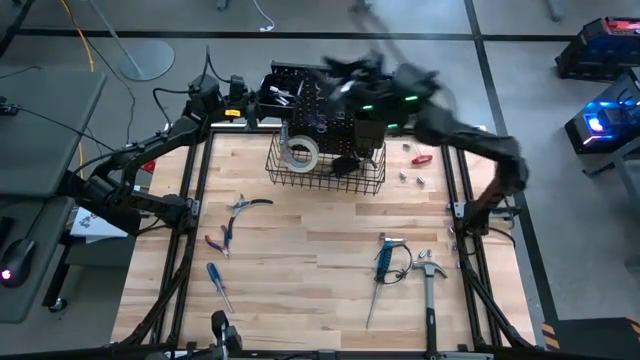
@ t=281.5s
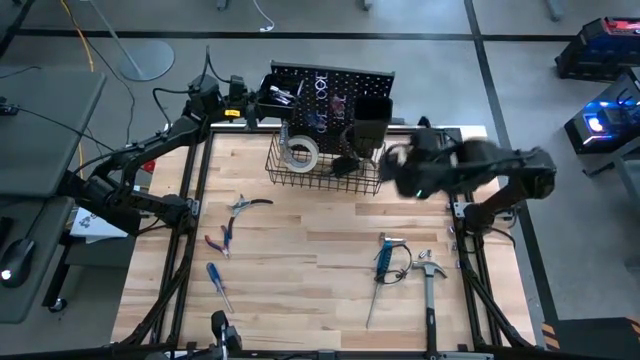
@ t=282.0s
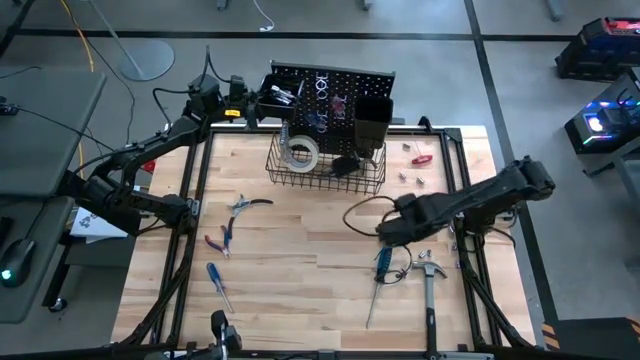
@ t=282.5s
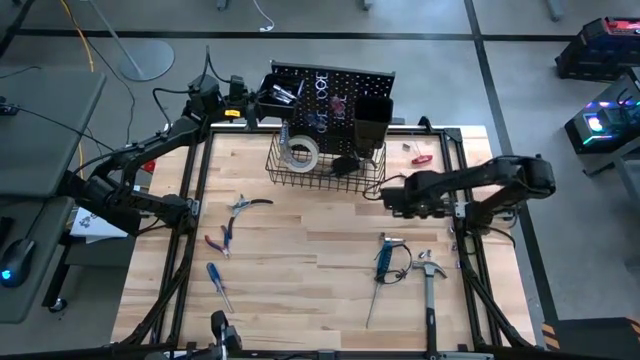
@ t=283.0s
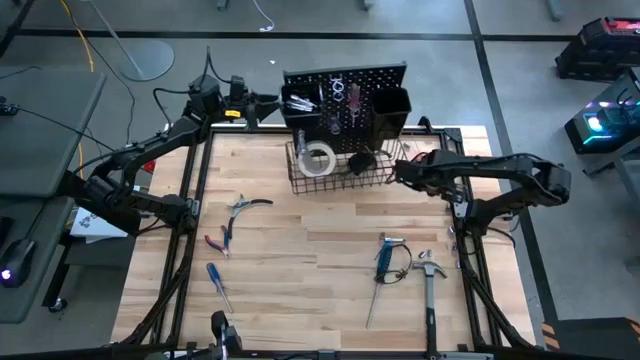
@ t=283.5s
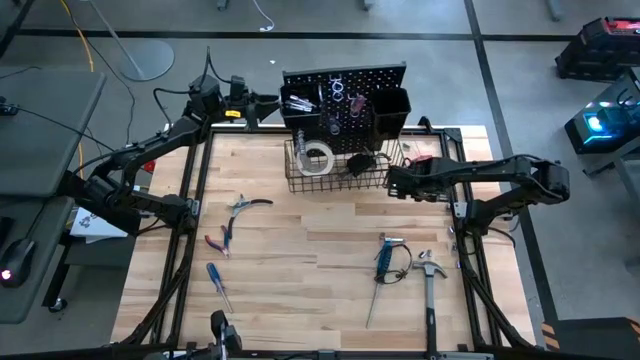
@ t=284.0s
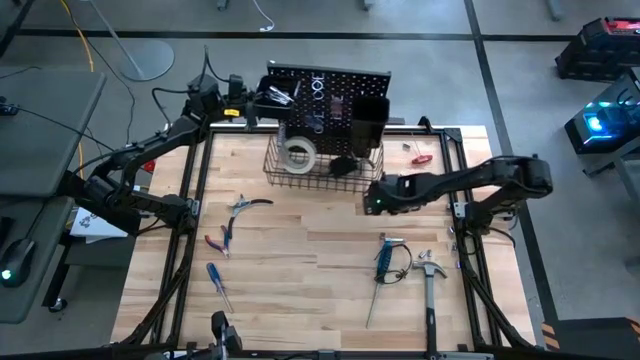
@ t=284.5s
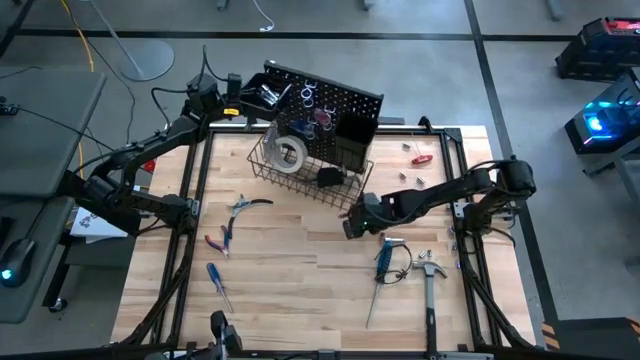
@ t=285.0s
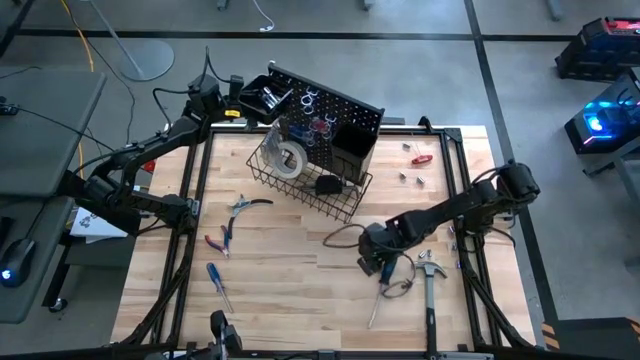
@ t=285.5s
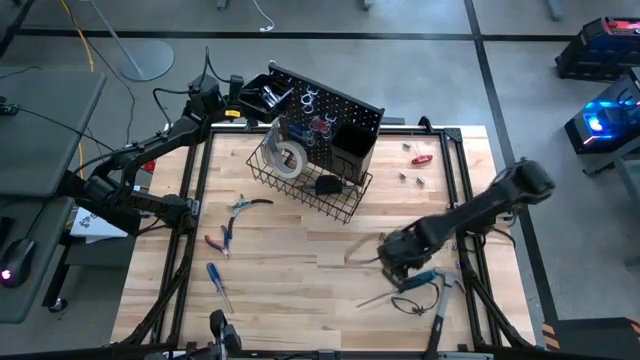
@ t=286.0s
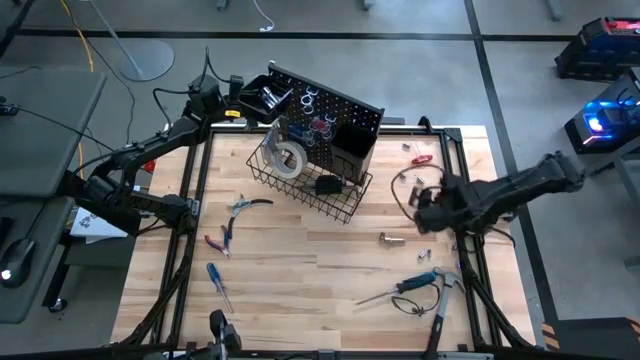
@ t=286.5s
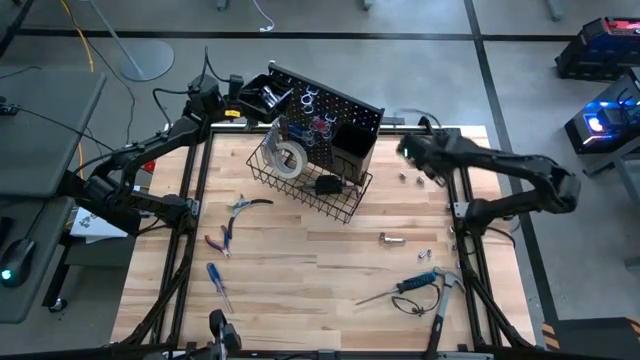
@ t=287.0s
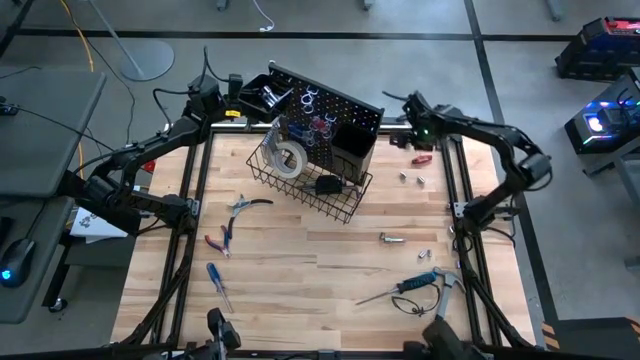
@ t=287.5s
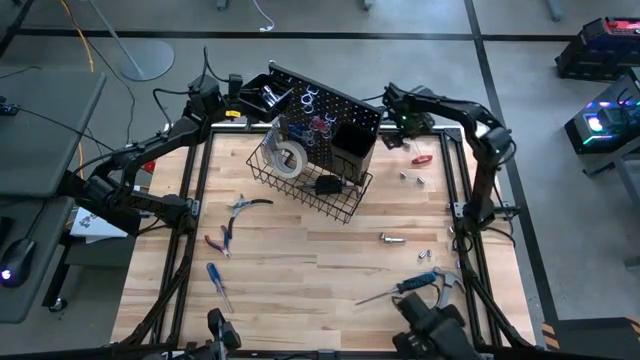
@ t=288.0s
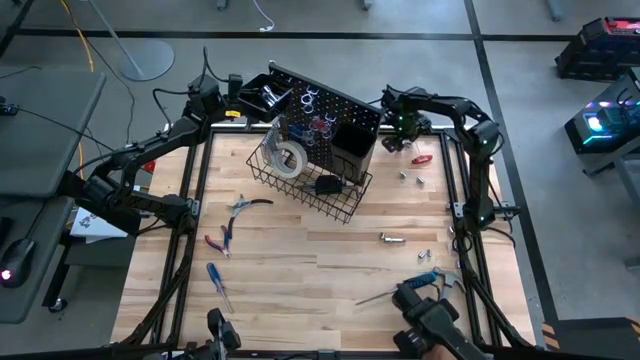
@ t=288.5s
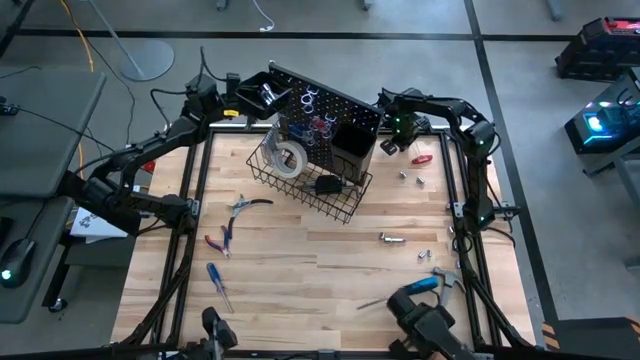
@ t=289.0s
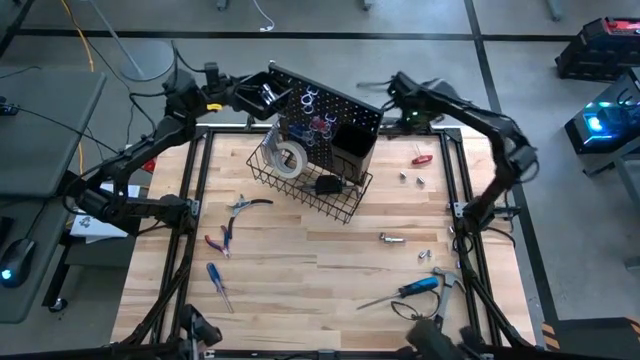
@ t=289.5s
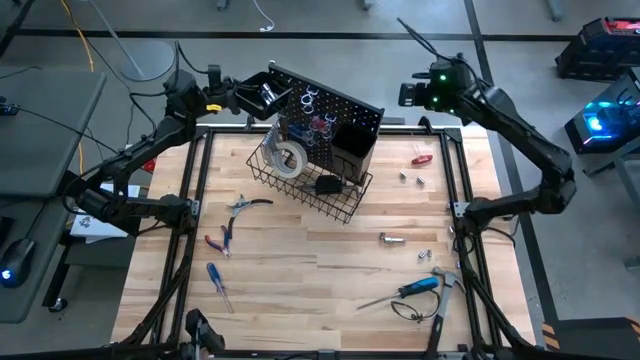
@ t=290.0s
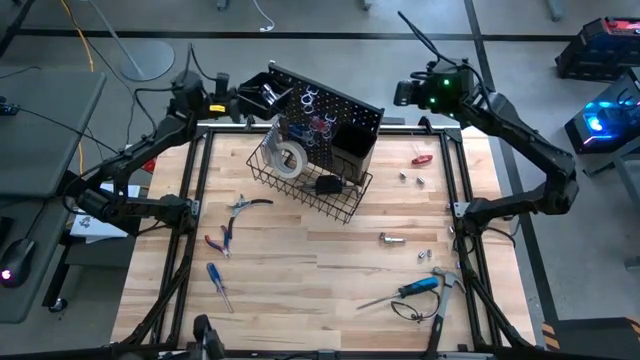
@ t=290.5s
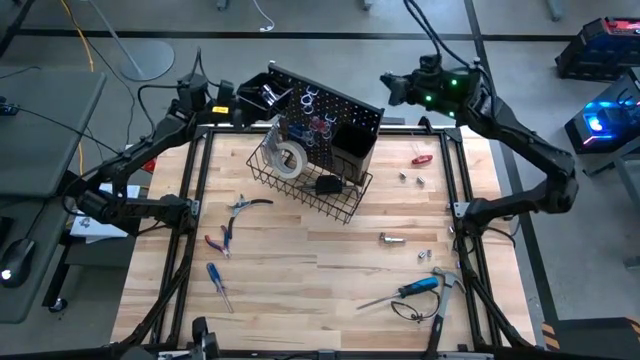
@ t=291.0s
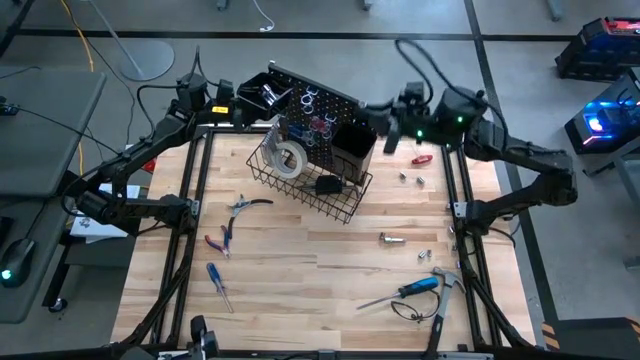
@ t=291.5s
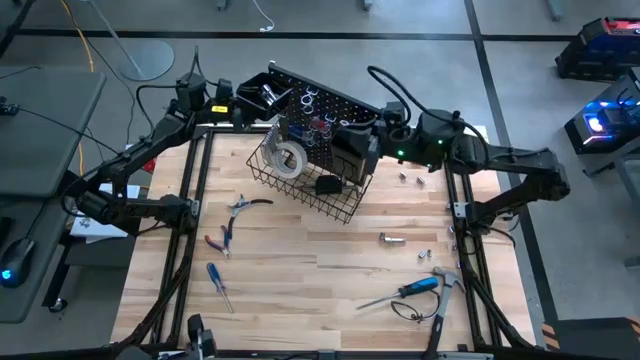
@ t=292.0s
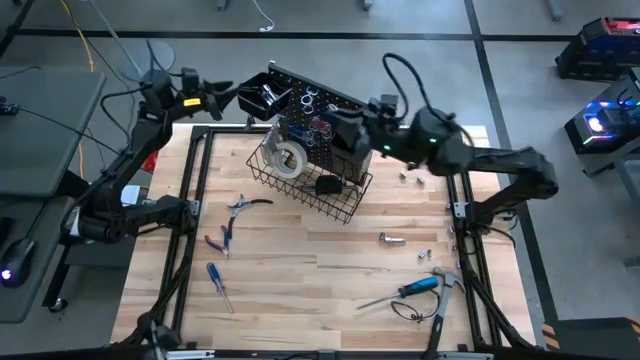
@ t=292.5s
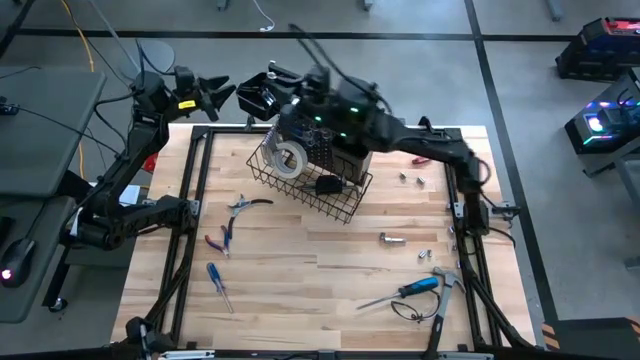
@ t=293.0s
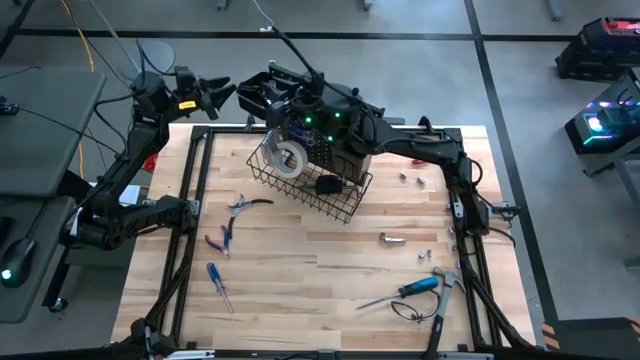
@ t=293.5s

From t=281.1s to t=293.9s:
Task: Hang tools onto peg board
Put the socket in the left black bin on the pegboard

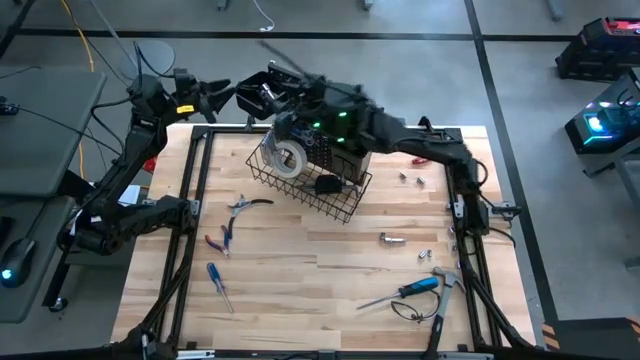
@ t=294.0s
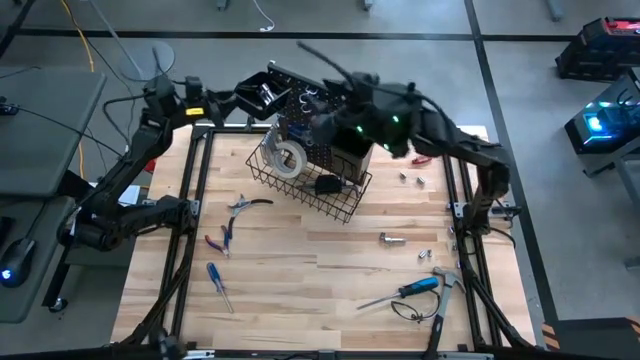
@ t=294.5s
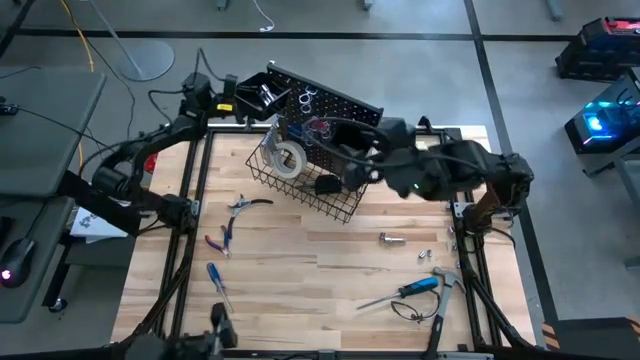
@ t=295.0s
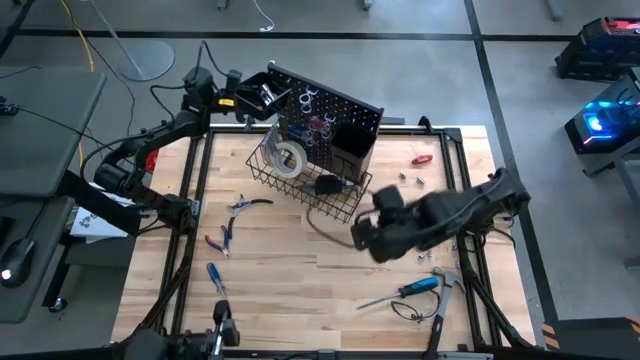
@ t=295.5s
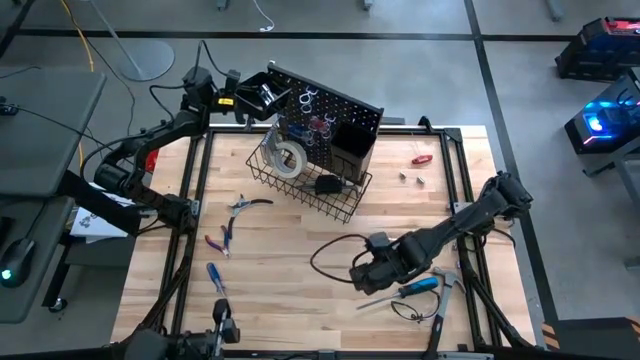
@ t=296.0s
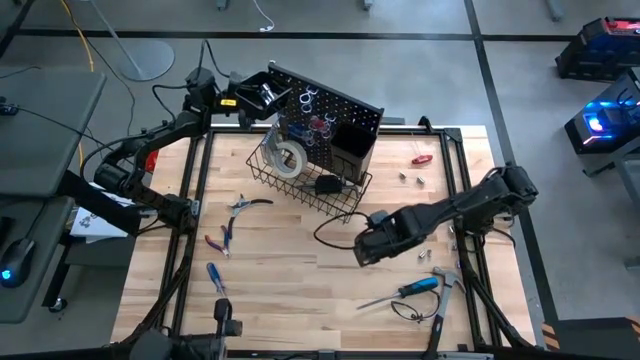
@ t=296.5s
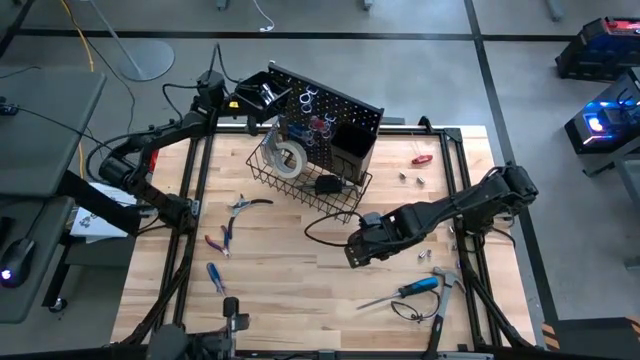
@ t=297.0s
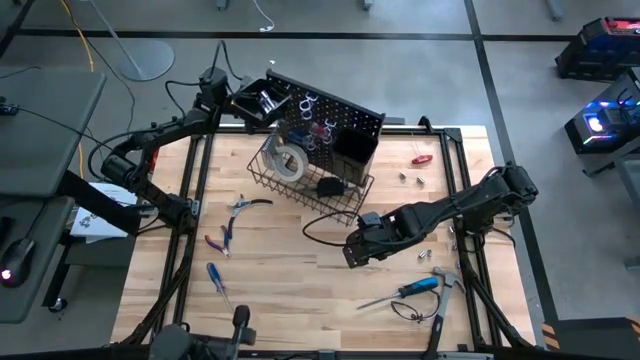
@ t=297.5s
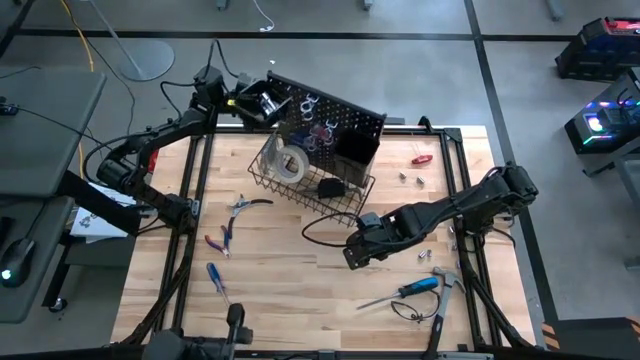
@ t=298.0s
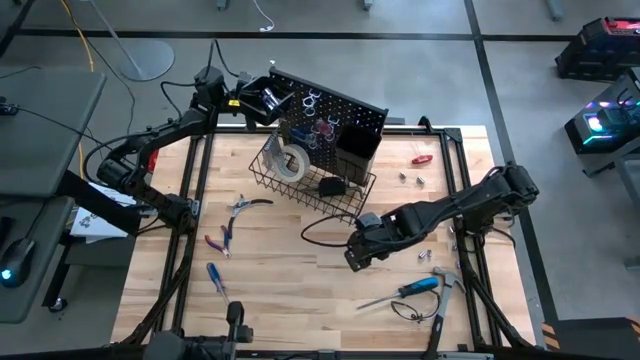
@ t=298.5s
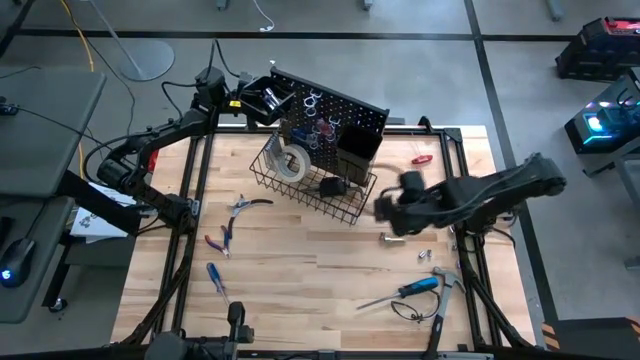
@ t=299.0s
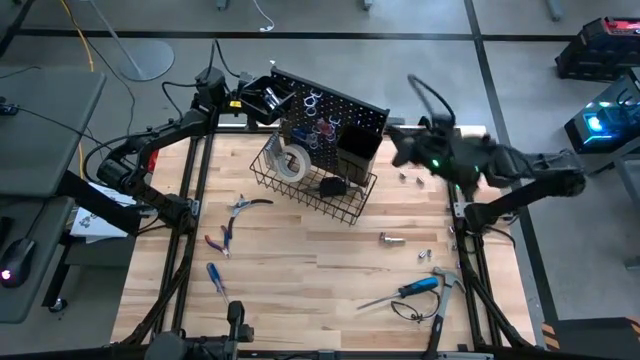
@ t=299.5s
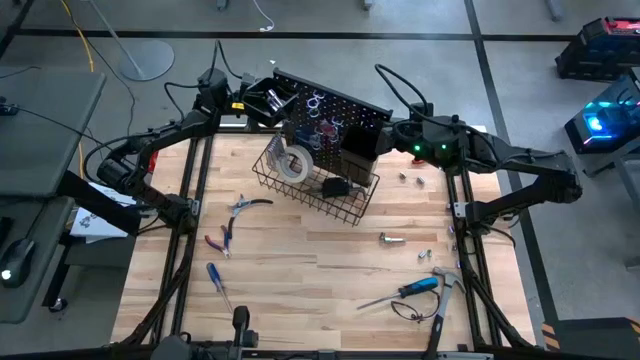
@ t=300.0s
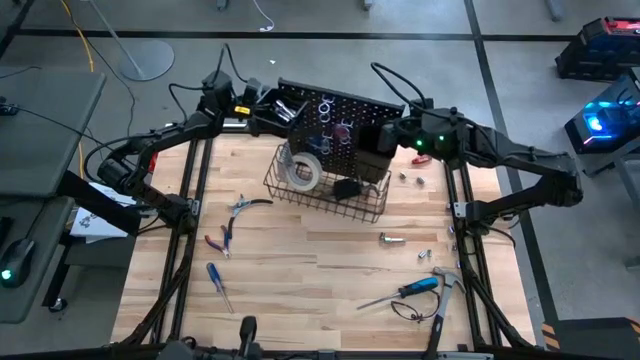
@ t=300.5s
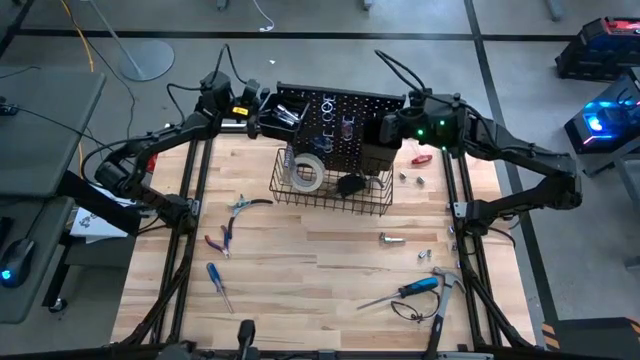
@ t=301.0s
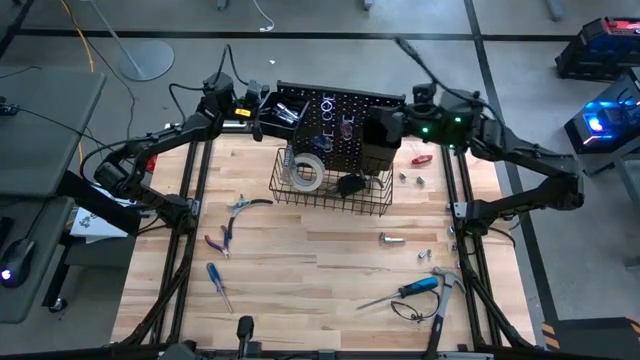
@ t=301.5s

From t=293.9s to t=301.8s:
Adjust the pegboard
